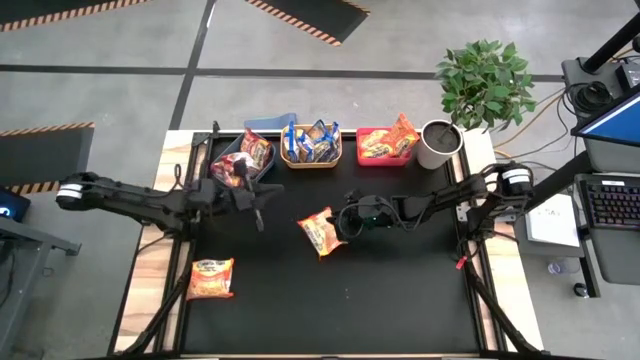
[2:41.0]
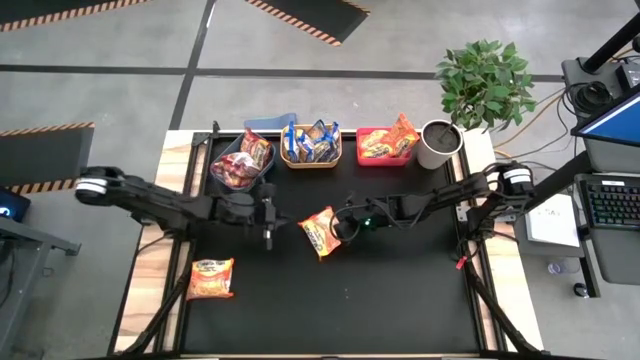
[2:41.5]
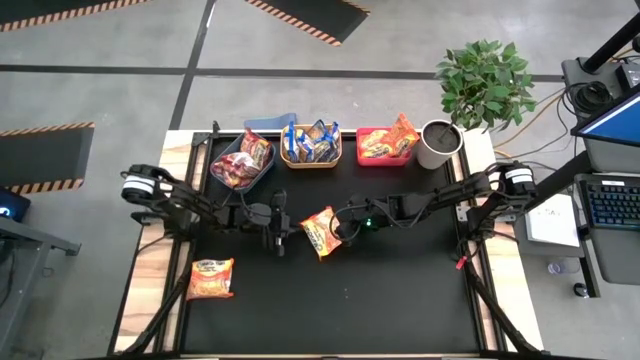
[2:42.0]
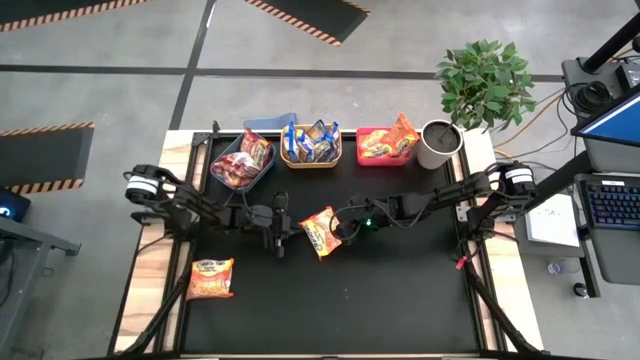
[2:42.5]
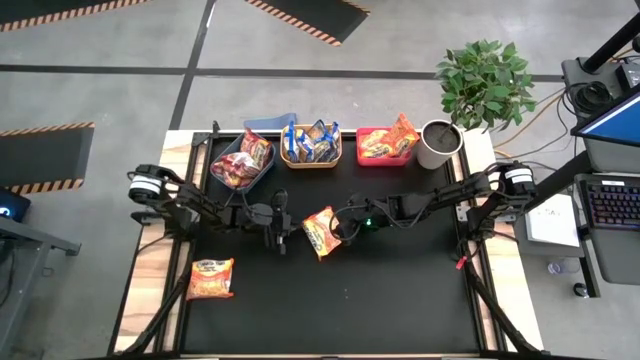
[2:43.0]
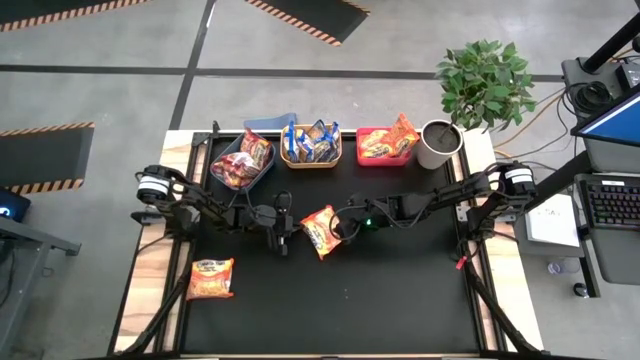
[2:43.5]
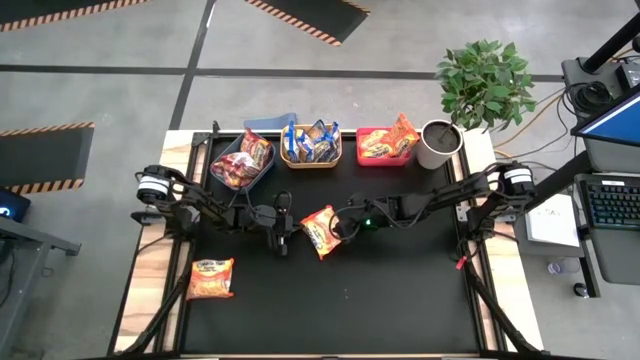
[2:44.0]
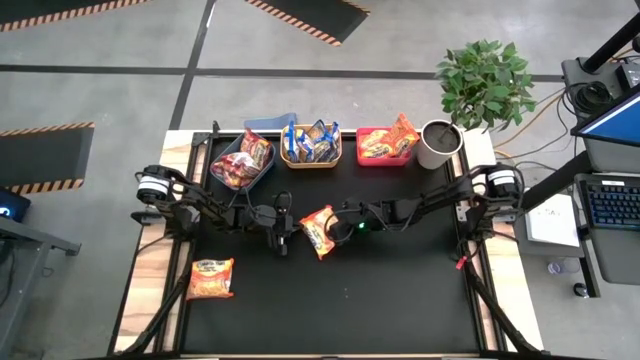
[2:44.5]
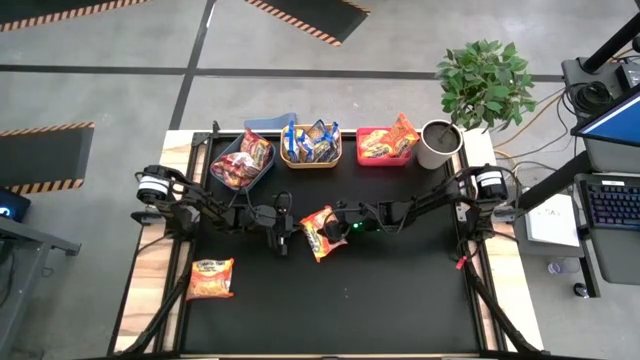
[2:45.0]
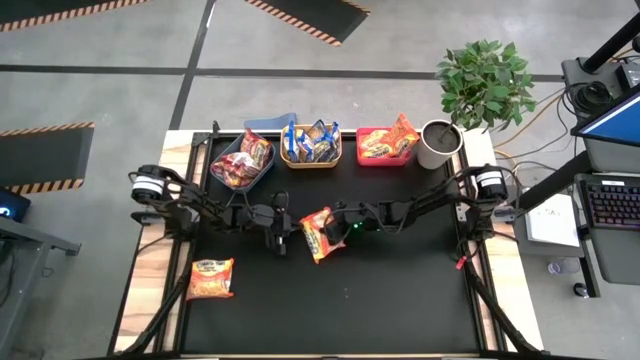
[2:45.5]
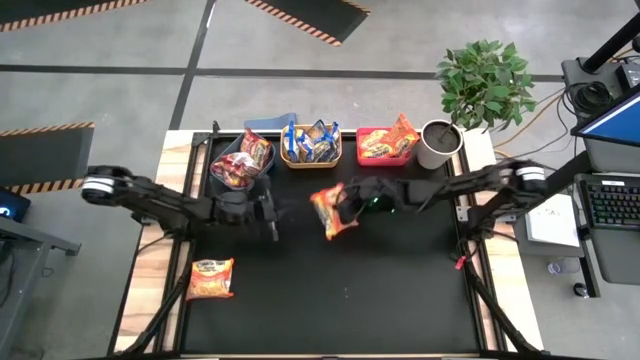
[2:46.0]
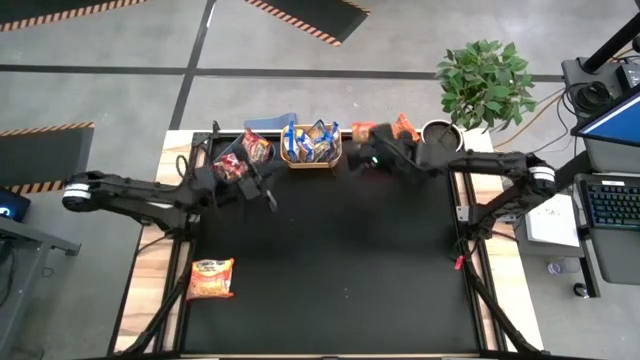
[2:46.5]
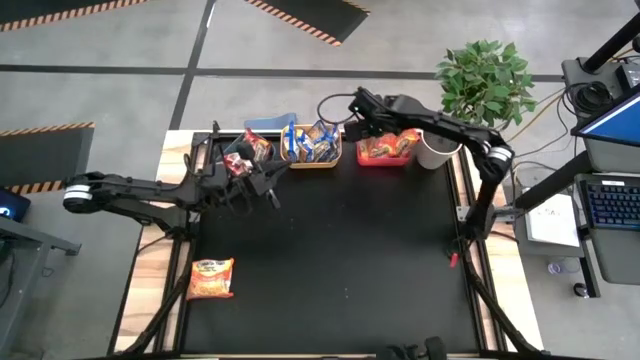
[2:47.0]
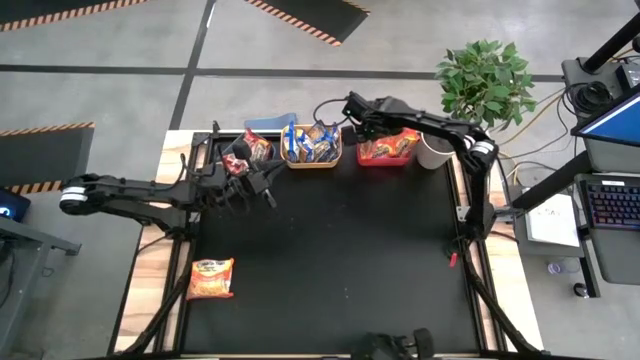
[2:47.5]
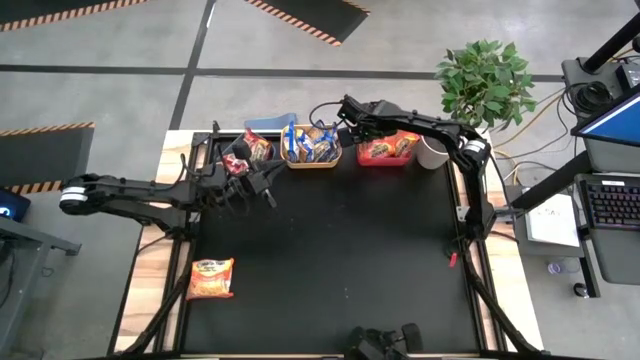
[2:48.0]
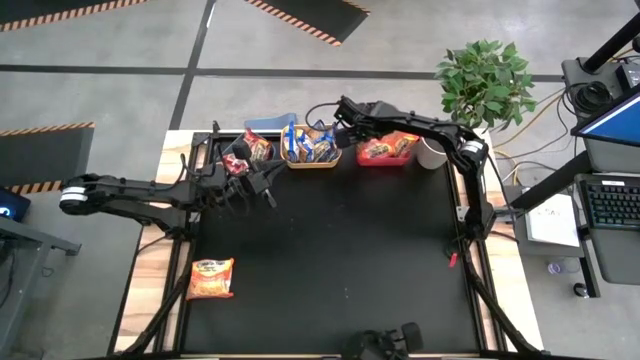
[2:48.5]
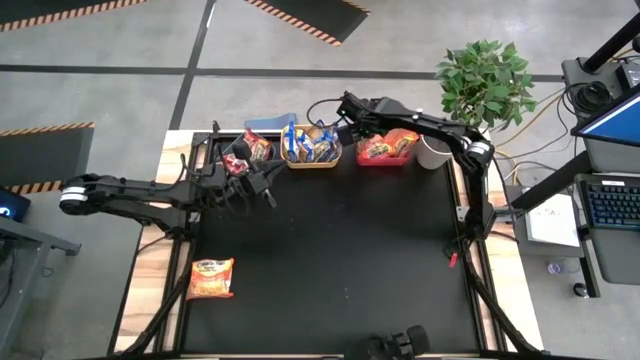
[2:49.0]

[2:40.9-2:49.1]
Task: Sort Maruchan noodles
Put the orange noodle pack into the red bin

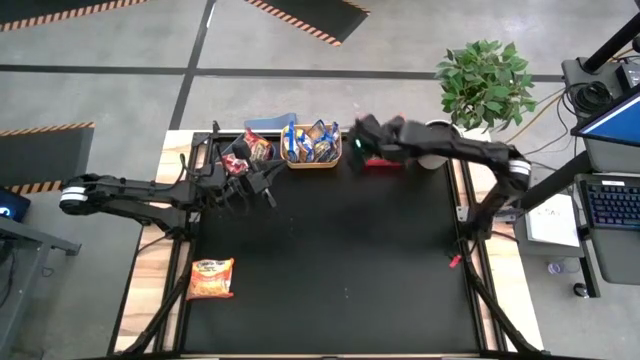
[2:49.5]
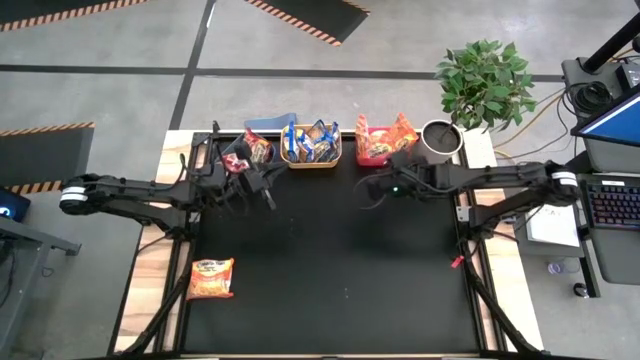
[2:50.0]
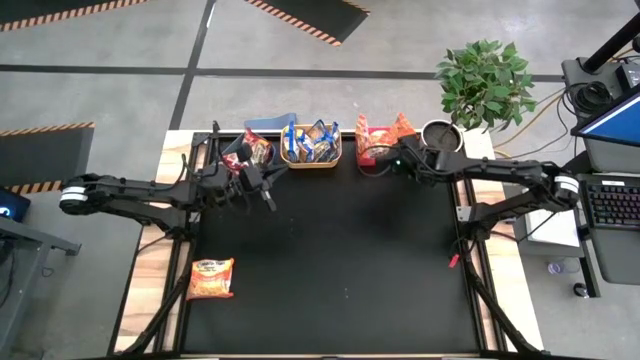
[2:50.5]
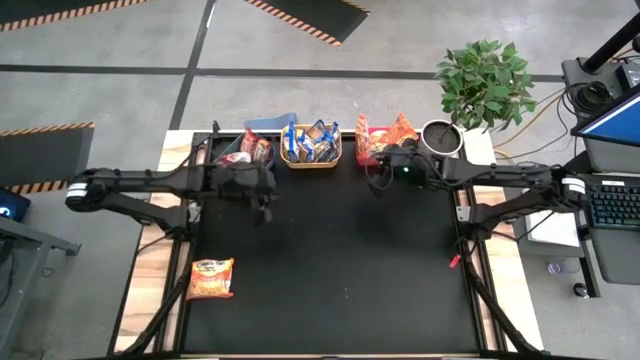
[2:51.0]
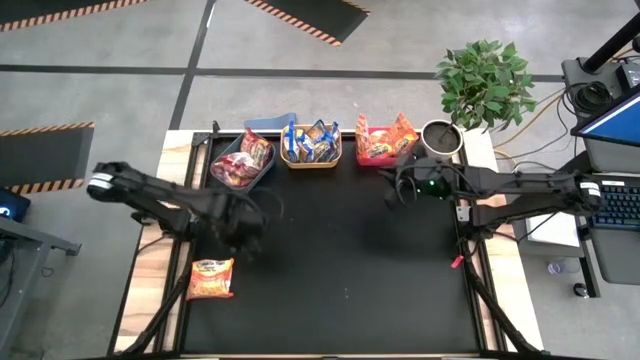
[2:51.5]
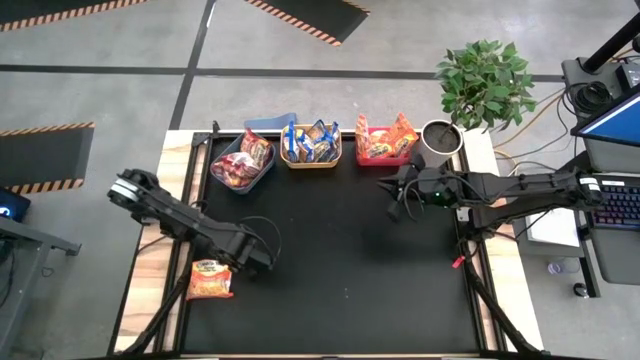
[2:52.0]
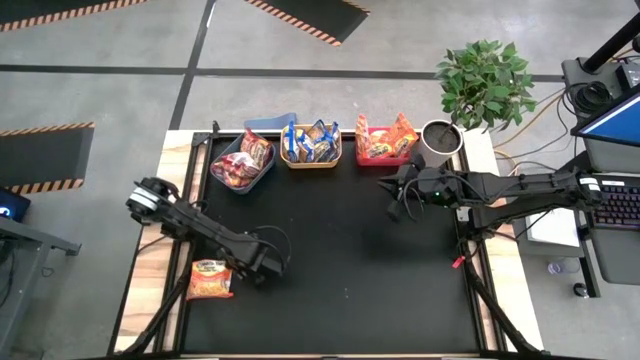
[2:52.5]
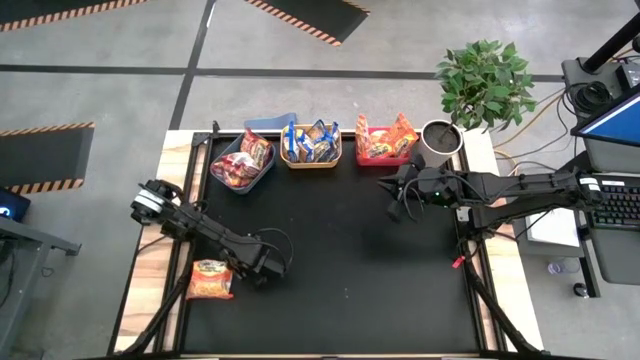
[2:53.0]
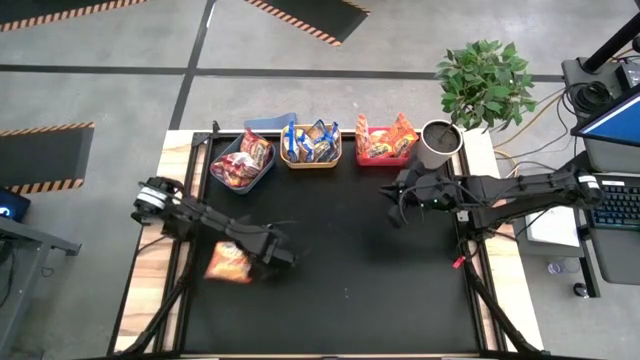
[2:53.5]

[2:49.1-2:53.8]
Put the orange noodle pack into the red bin

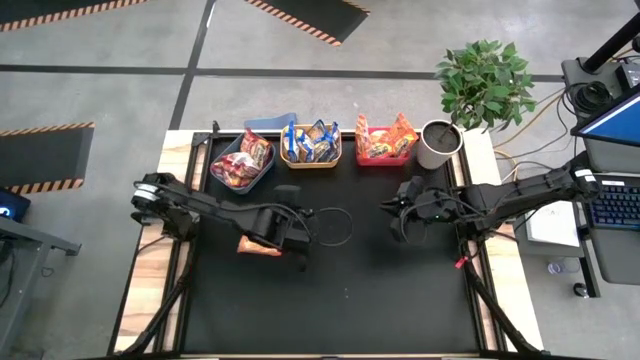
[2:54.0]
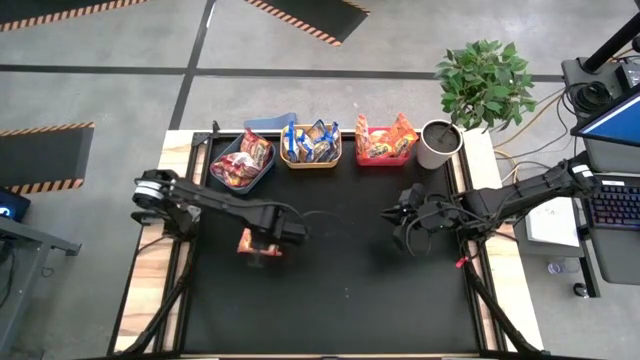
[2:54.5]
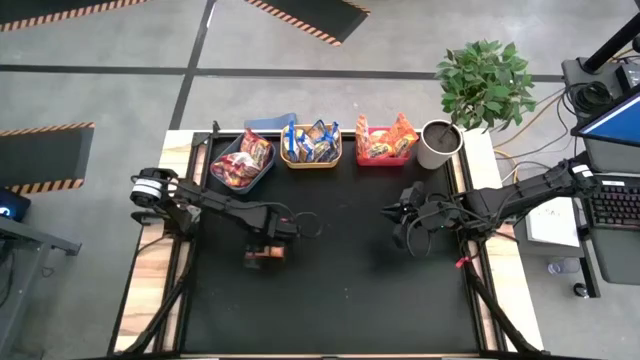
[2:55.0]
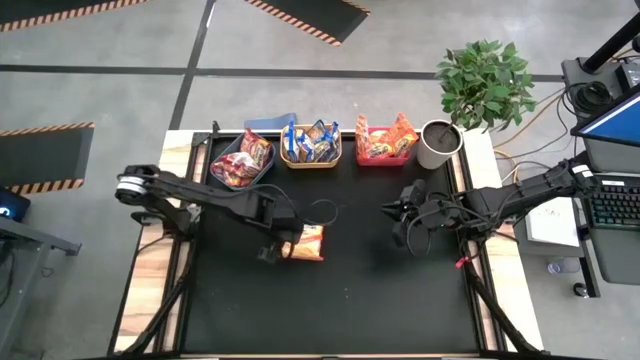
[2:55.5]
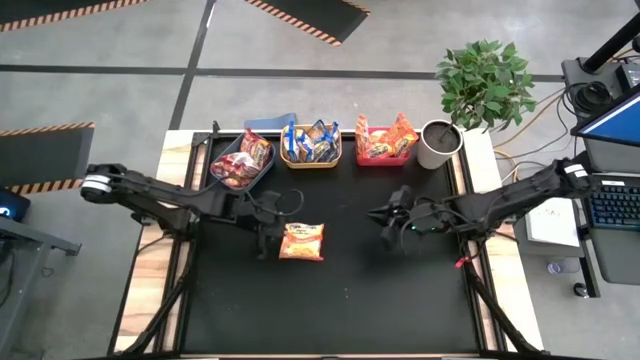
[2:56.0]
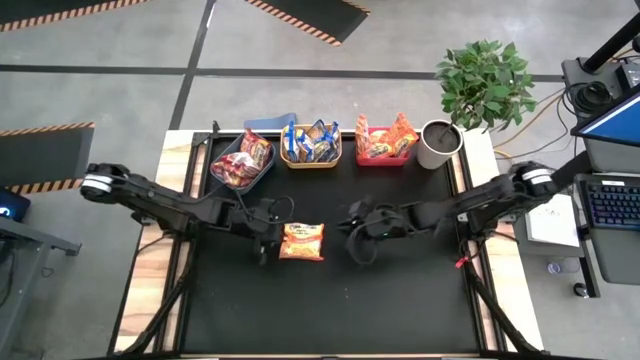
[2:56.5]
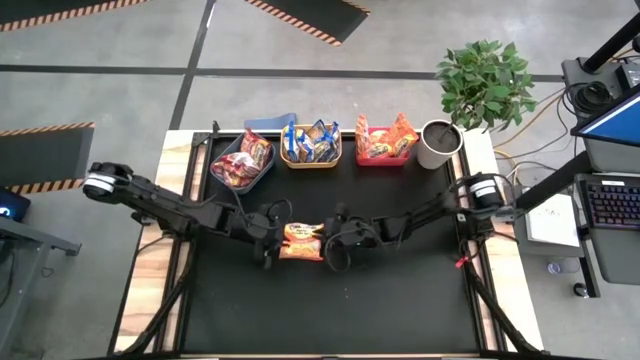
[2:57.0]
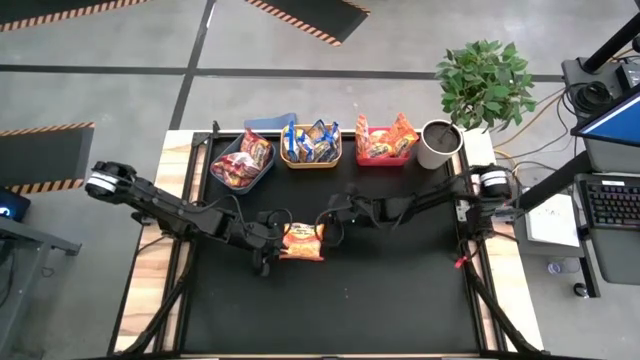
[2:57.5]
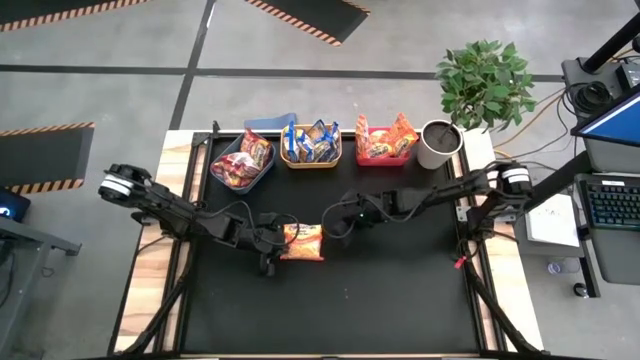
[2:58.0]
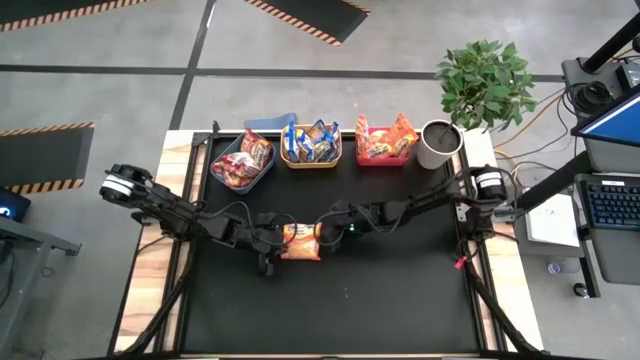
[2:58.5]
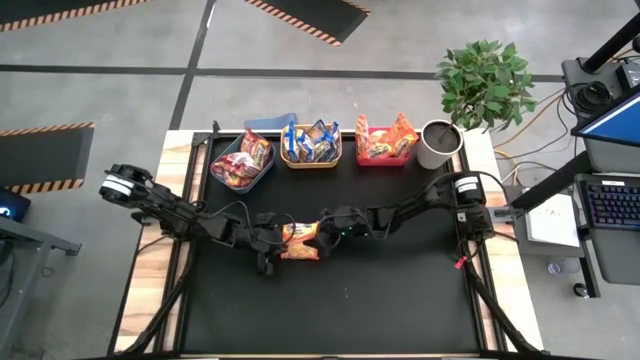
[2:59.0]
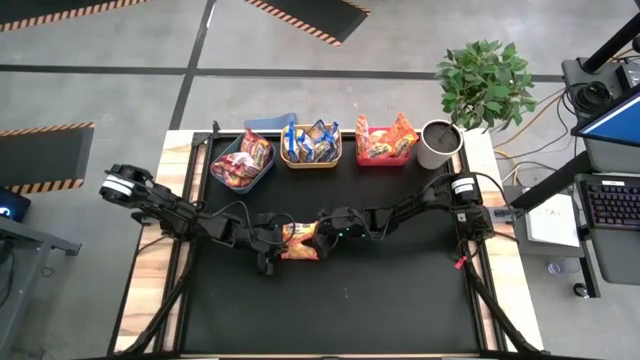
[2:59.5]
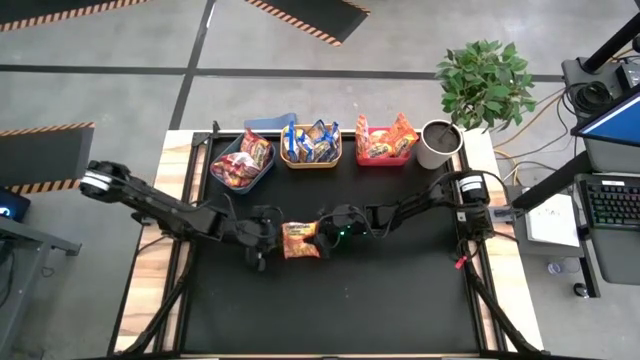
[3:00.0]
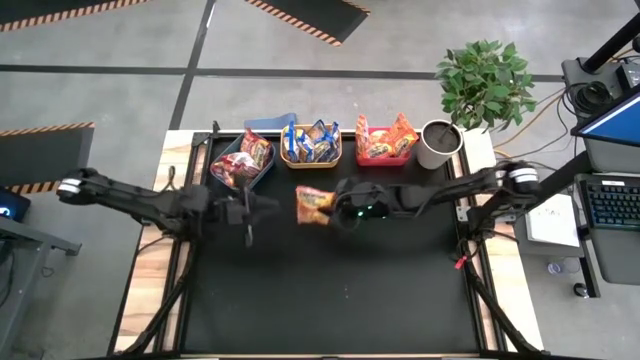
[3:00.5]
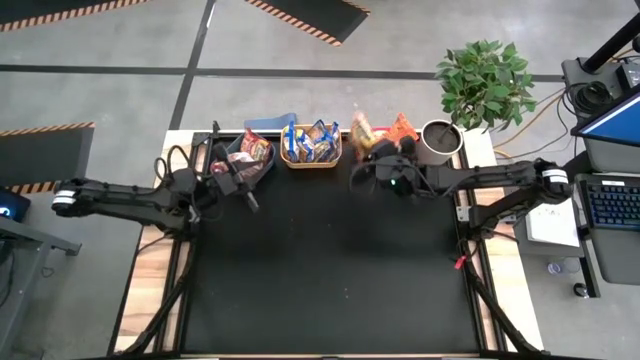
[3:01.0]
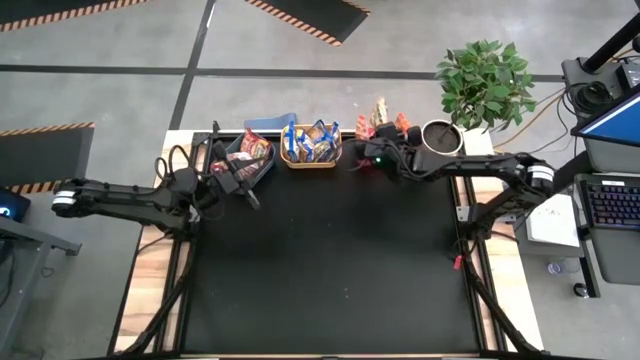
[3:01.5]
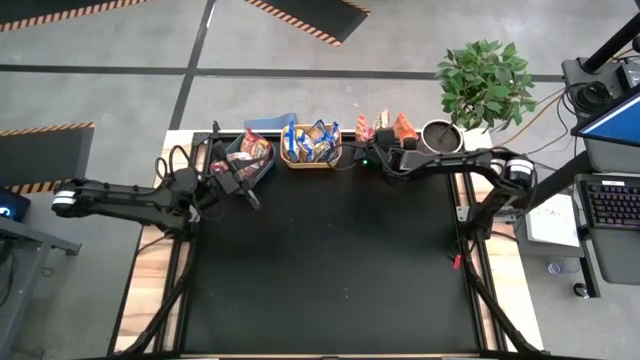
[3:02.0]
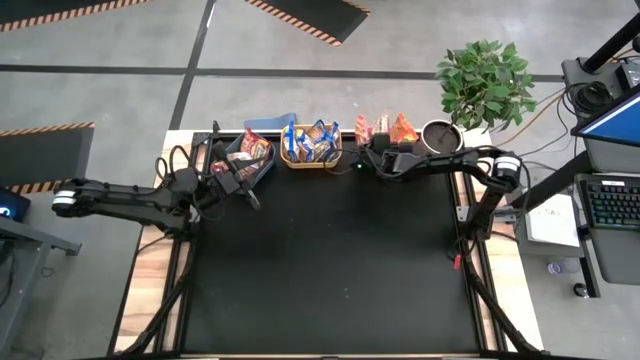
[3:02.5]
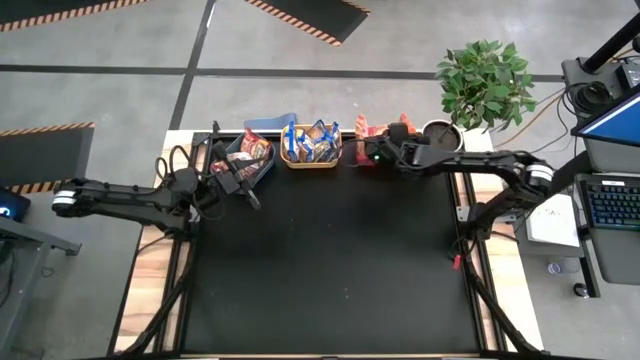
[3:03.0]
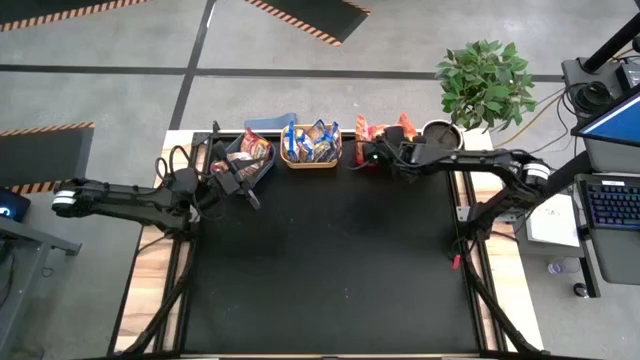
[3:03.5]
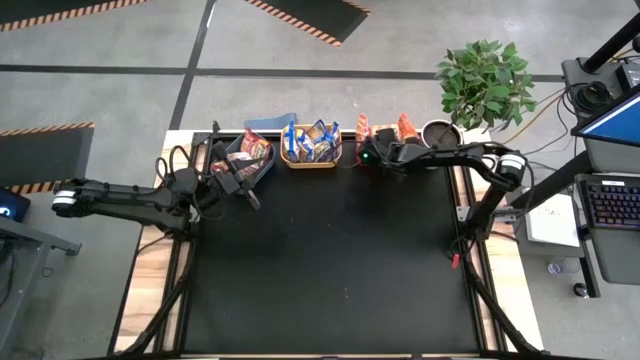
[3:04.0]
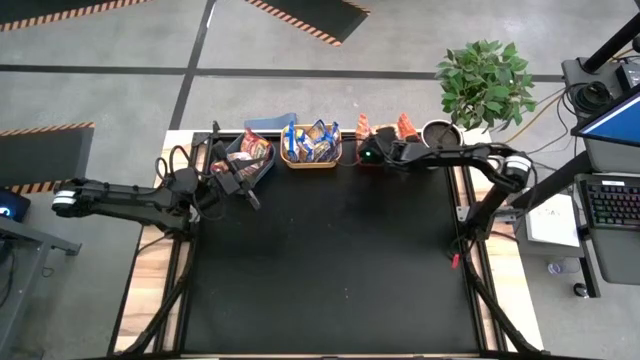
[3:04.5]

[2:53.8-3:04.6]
Put the orange noodle pack into the red bin
